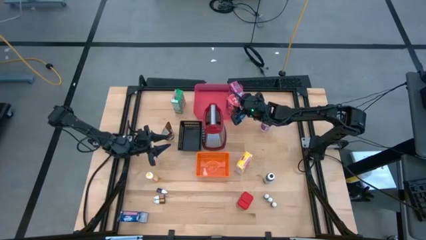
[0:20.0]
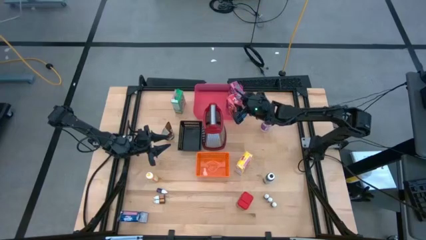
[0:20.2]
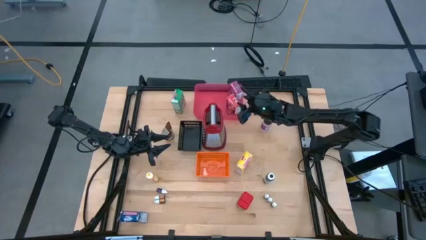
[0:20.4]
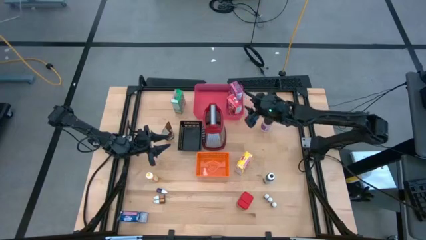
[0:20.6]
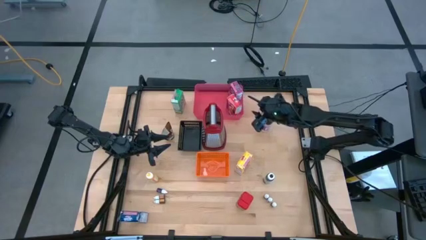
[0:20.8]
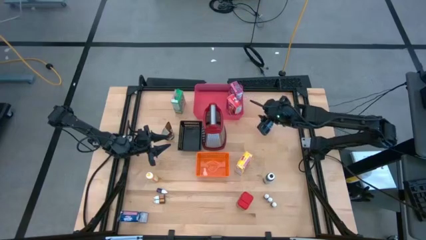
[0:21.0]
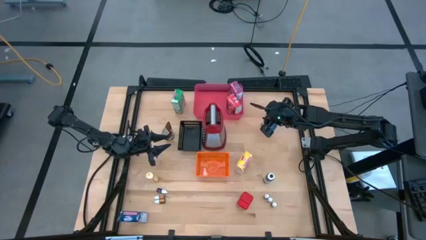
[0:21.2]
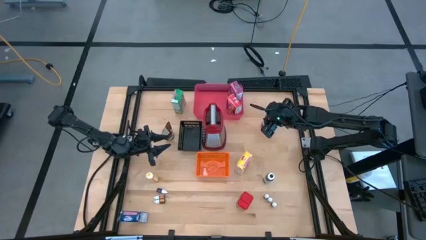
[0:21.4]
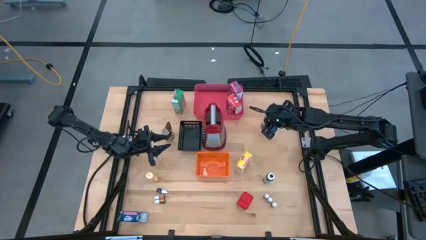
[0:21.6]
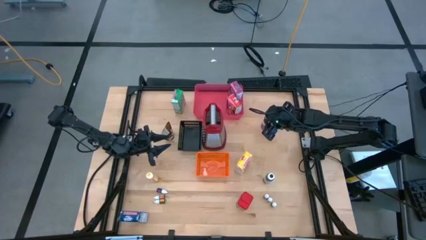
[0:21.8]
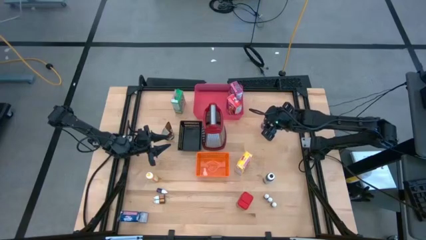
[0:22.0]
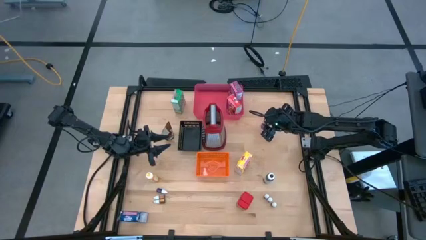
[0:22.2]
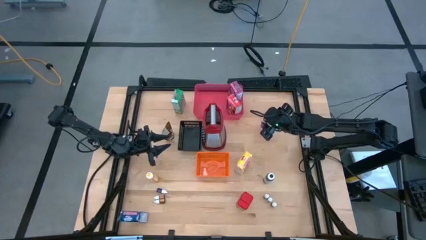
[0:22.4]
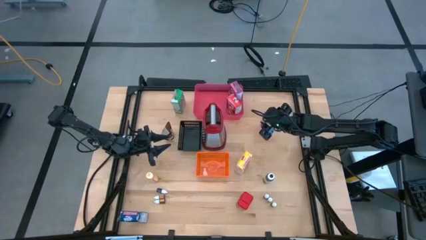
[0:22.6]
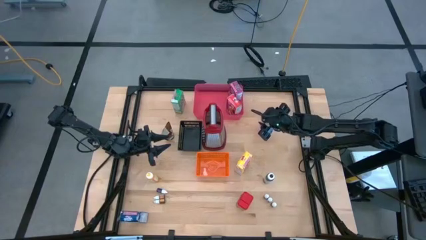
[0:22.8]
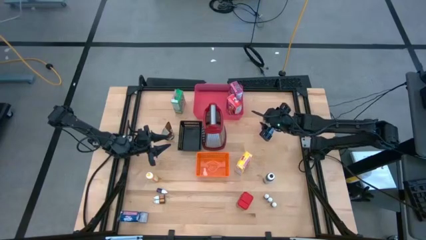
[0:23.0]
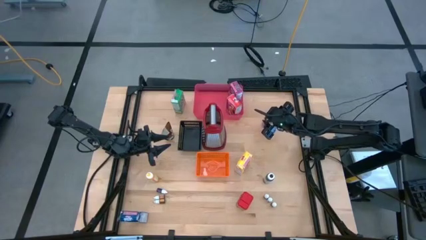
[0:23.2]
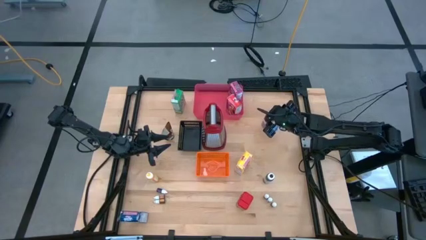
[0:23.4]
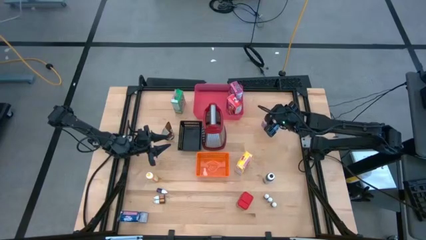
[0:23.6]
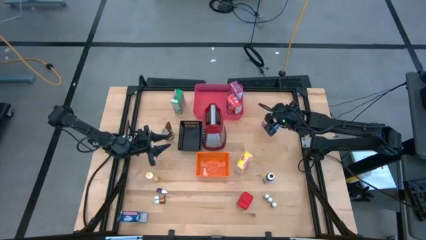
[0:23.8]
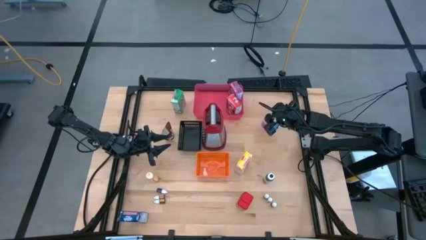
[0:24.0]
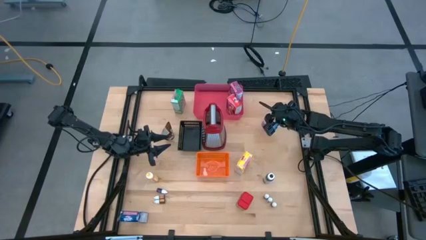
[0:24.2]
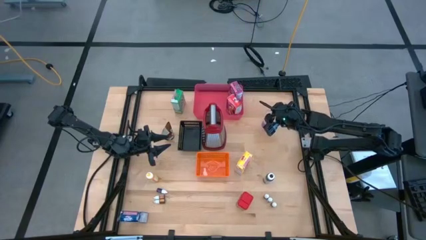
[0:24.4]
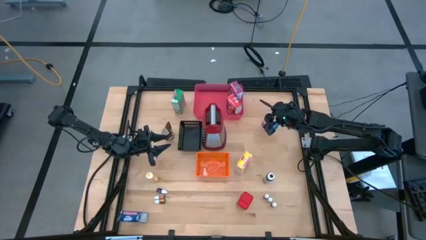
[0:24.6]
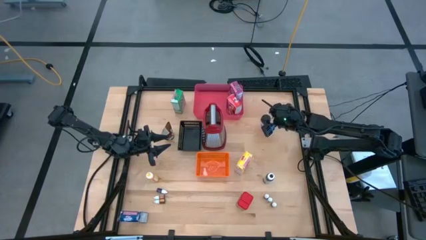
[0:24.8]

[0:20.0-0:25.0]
Task: Pick & Place Kitchen Items
Put the violet seasoning bottle into the black bin

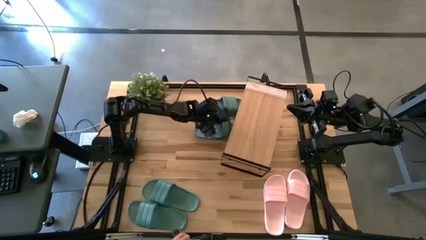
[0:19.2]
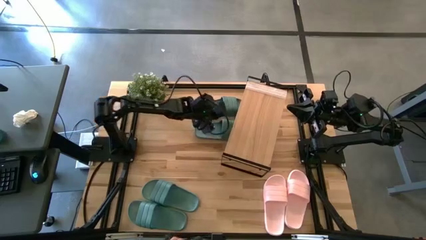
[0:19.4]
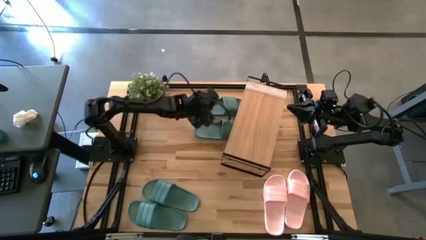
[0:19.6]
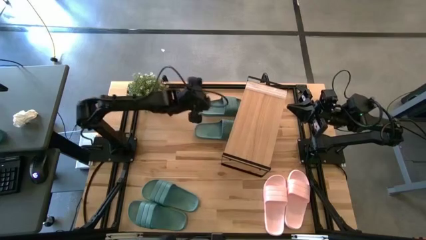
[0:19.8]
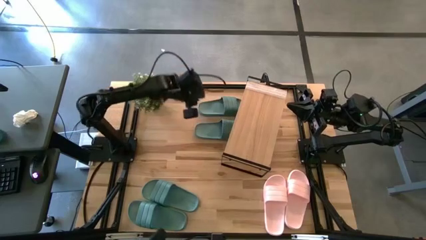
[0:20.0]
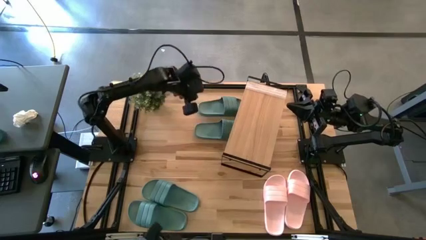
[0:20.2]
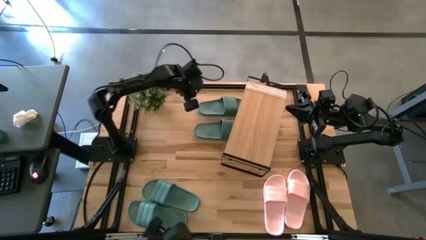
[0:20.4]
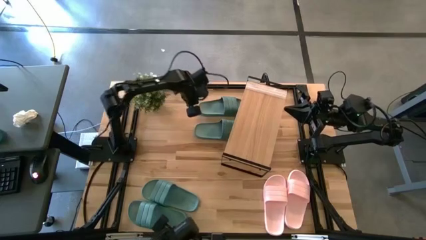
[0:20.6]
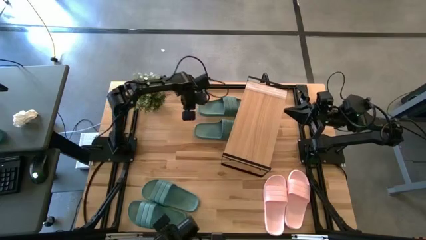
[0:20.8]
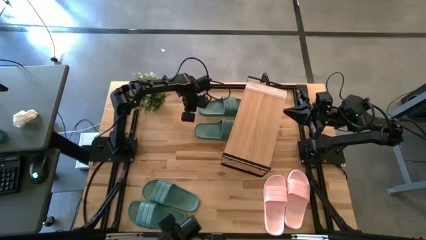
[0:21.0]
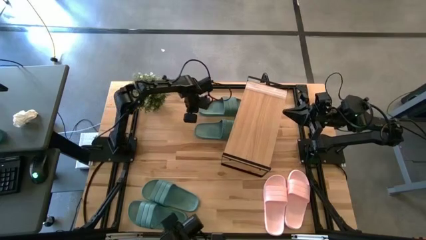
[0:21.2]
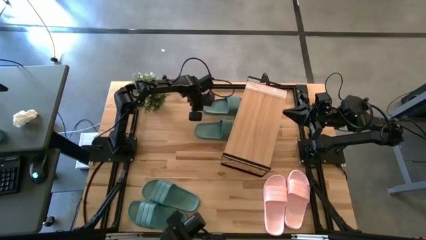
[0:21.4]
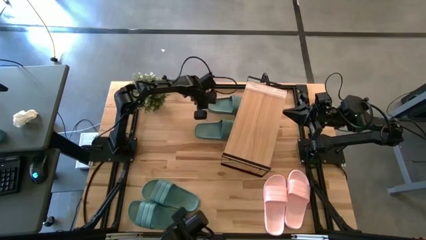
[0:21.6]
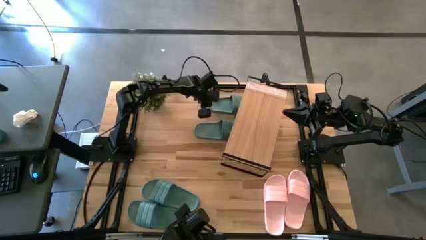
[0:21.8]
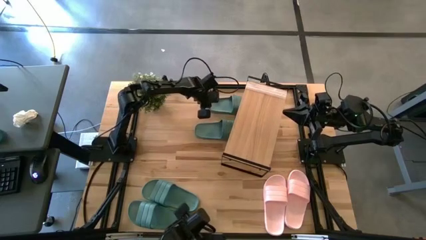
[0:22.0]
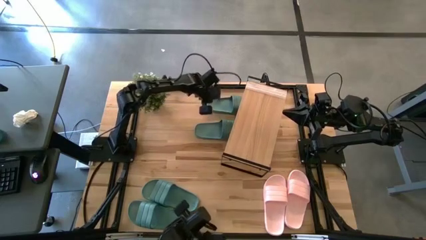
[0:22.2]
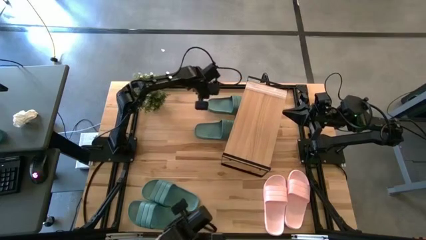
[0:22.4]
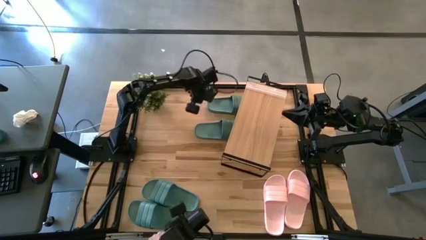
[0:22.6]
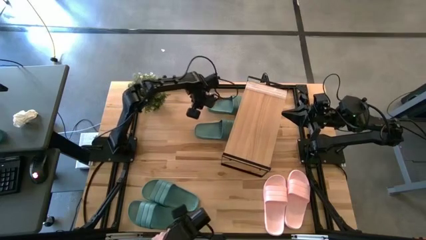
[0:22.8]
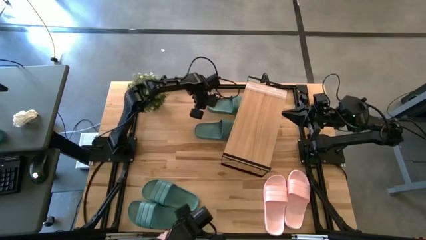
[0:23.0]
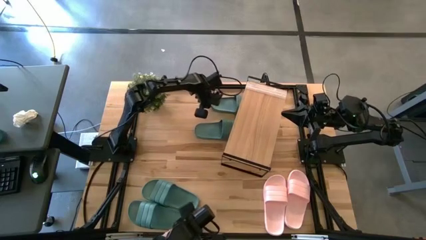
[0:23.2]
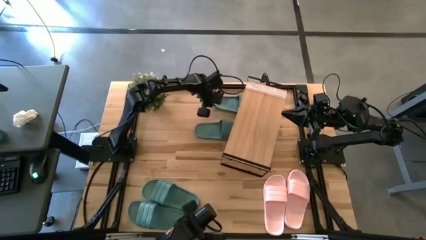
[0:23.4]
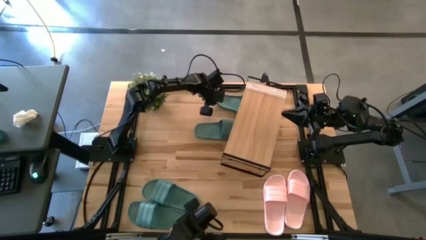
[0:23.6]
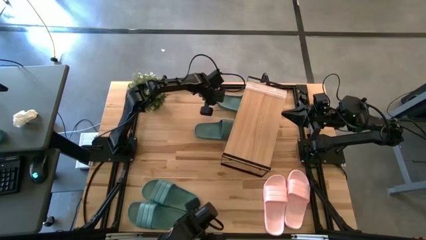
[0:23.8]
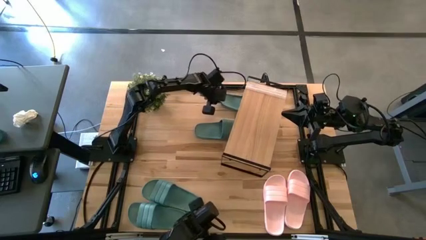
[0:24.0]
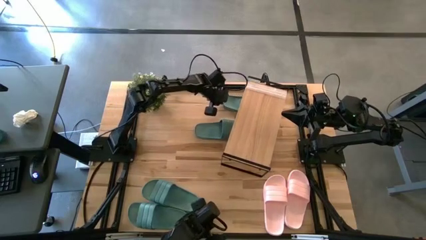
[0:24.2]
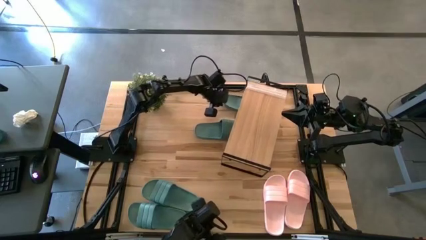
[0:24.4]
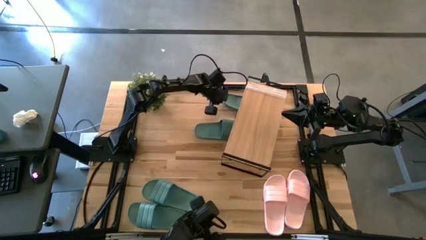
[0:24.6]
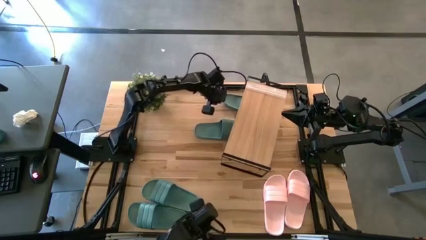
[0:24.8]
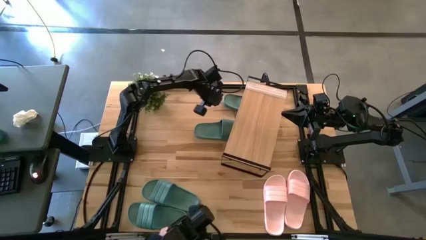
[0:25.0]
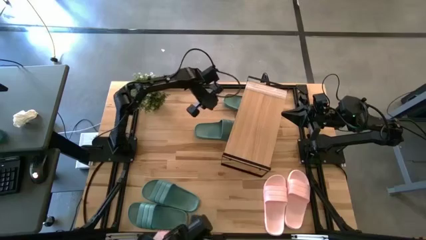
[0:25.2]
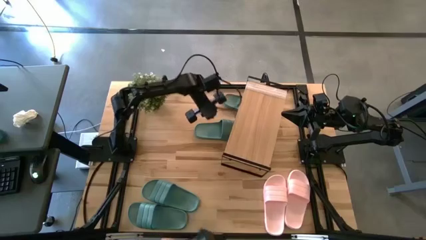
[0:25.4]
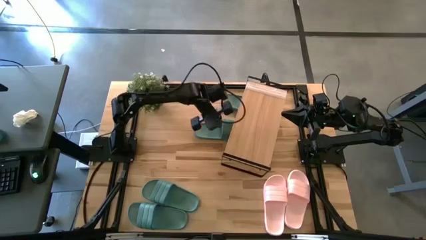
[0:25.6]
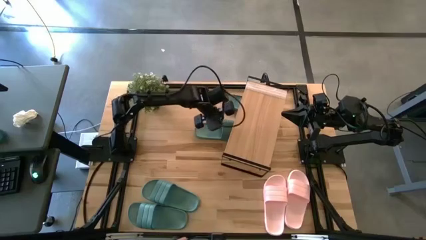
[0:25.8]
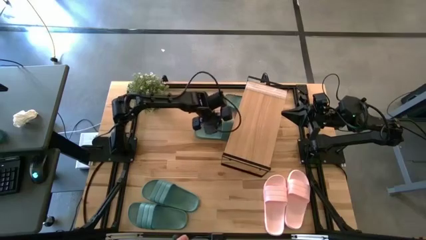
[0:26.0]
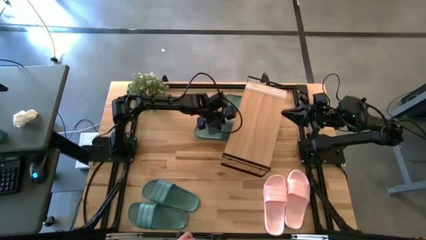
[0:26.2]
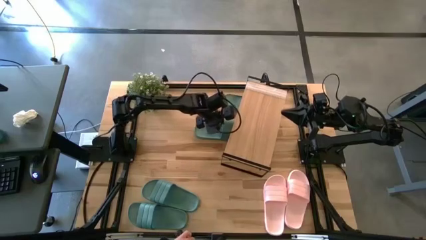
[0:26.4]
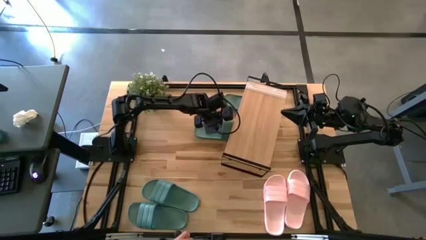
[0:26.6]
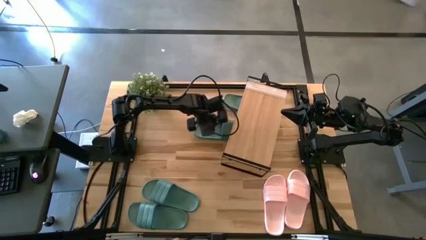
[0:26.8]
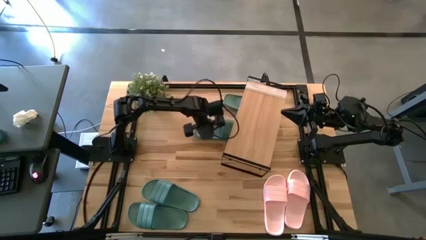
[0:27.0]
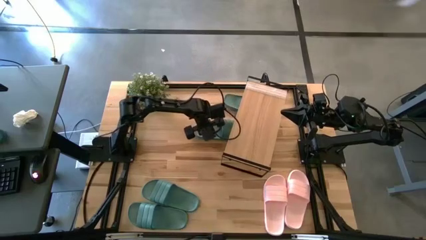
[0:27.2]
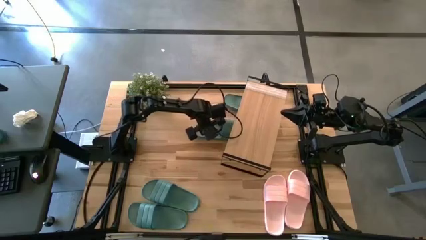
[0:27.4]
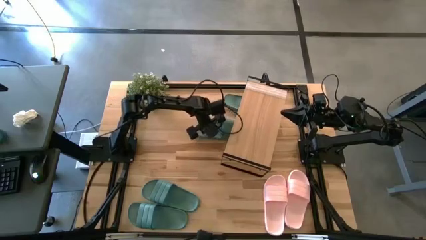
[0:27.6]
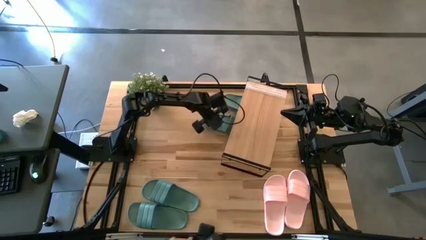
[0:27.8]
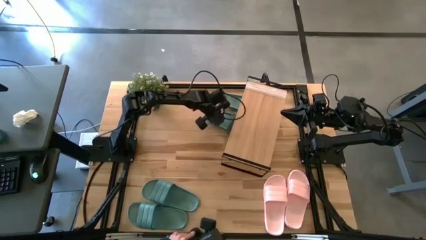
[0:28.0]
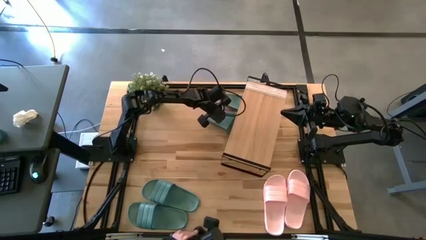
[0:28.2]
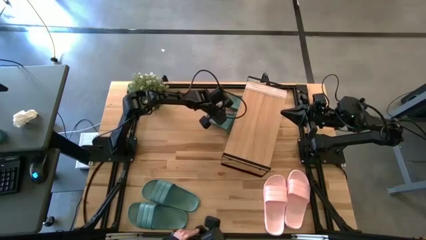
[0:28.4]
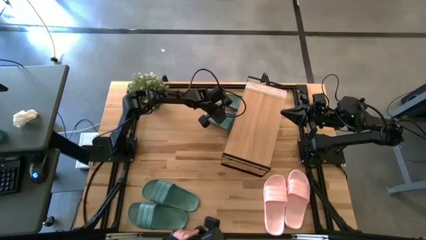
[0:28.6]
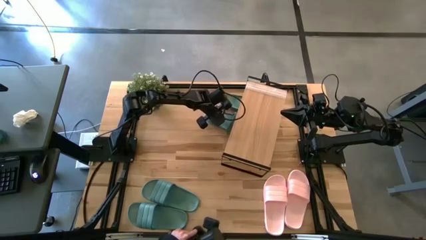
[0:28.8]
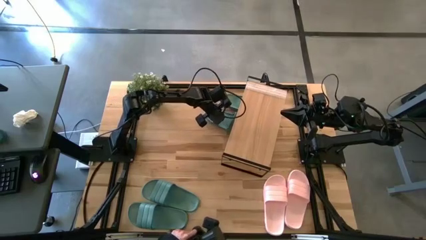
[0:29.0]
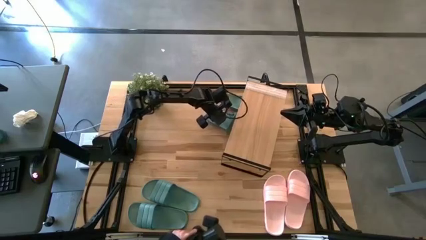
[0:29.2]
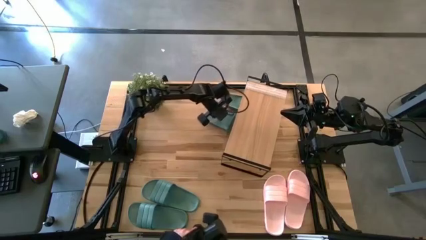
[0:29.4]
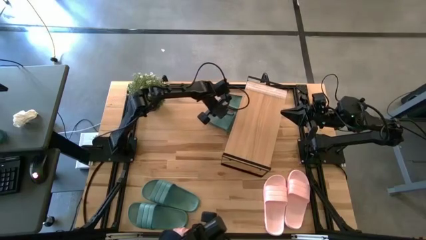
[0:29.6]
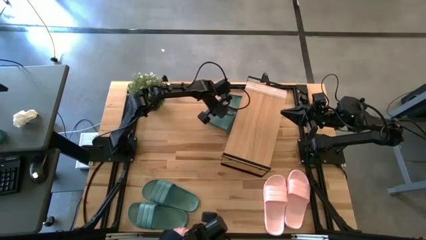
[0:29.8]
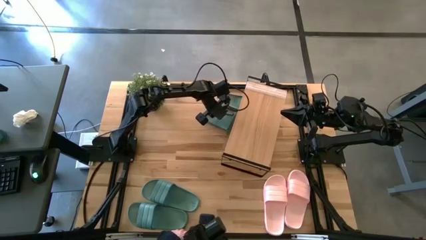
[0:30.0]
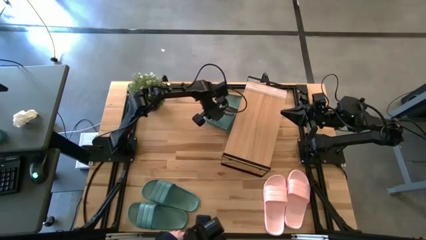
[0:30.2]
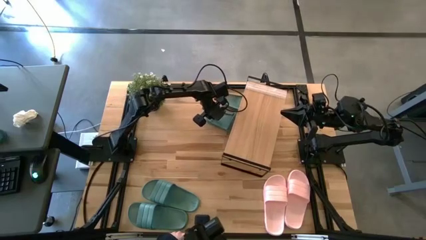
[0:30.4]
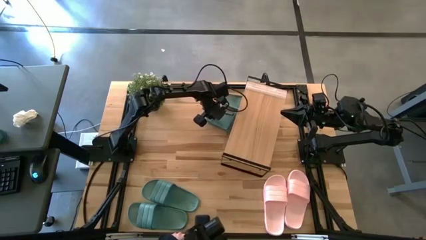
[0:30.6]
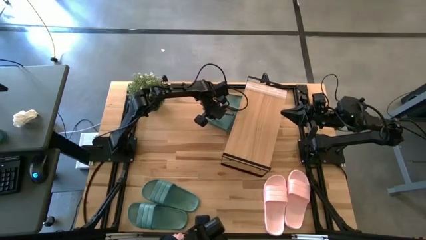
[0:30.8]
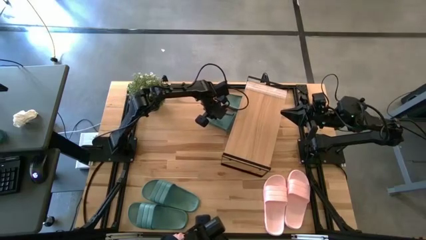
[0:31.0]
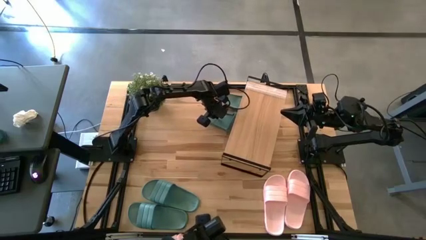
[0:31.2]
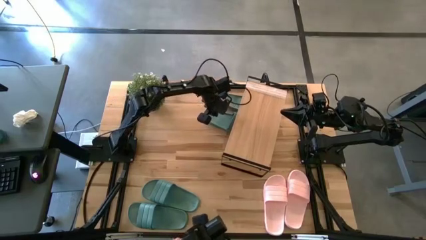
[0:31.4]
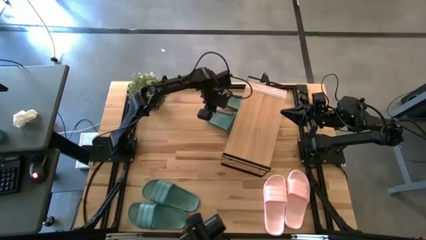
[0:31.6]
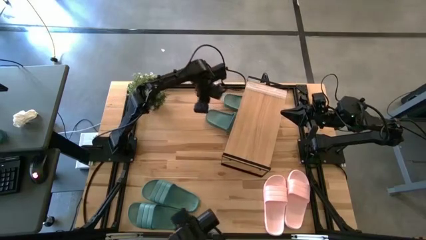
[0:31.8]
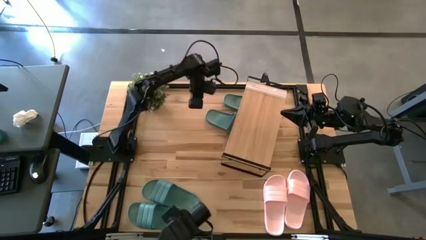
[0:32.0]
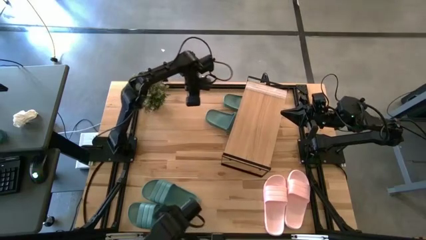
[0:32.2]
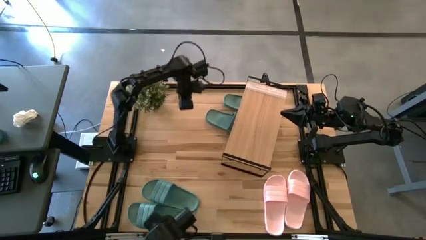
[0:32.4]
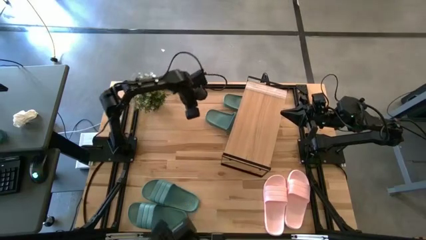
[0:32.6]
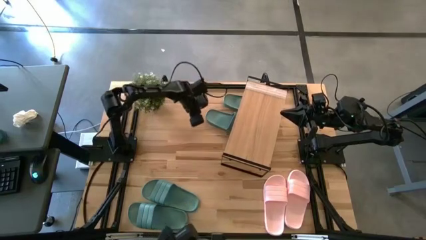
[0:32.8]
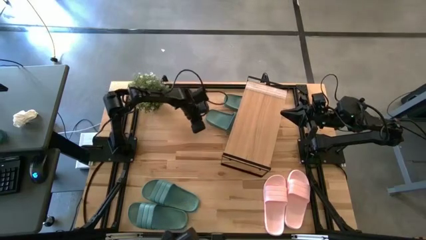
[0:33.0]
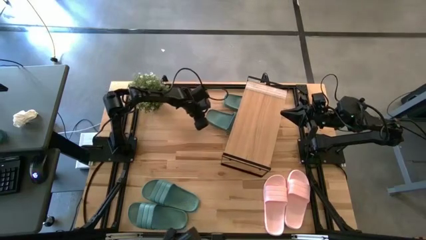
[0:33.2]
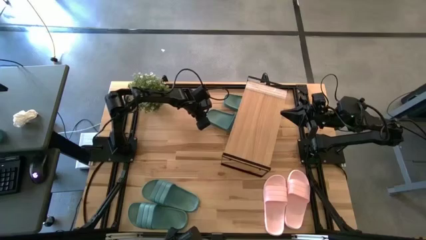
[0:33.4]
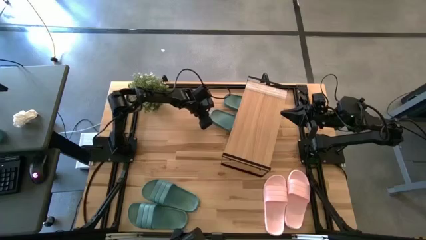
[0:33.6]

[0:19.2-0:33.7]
Task: Pick and place slides into the shelf
Adjust the green slides under the shelf
